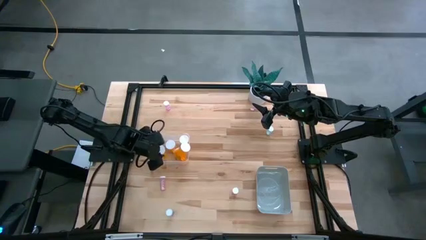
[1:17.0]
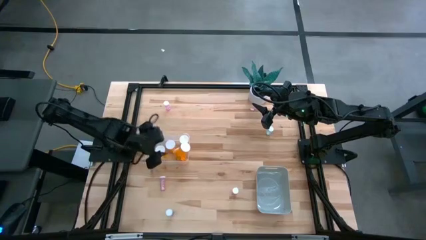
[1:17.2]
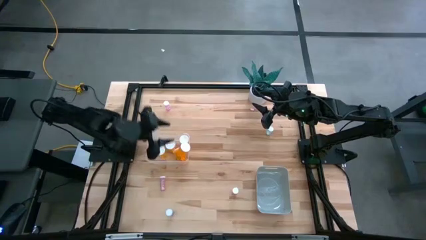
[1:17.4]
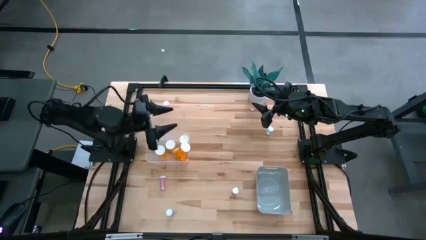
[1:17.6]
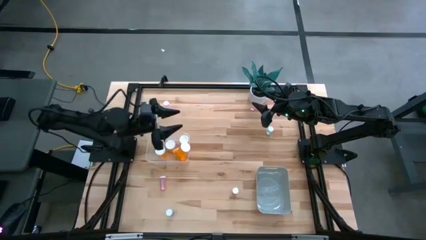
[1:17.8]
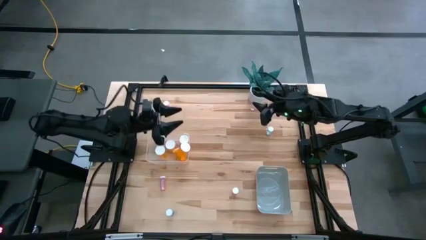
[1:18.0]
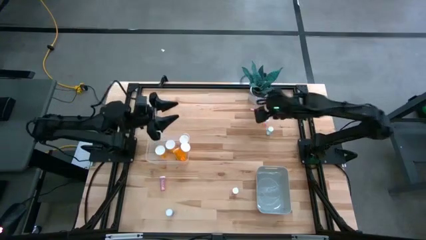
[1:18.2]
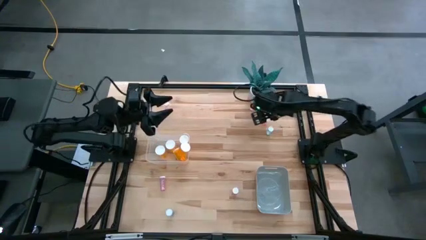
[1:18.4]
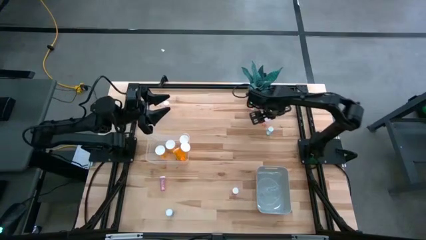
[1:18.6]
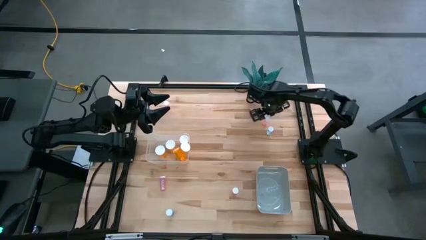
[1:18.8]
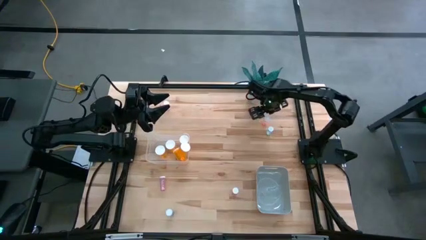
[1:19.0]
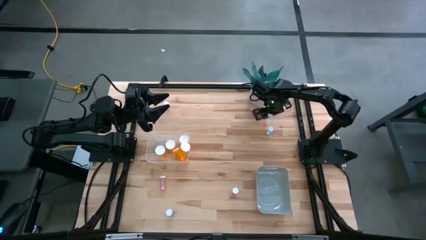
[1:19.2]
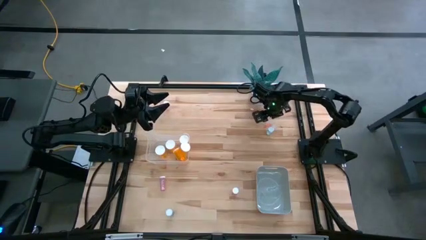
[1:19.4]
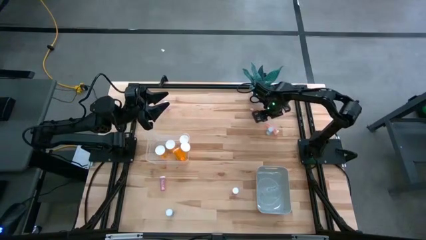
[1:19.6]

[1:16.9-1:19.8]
Task: Pick and place medicine bottles into bin by pill shape (circle, oval)
Put the small red pill bottle into the gray bin

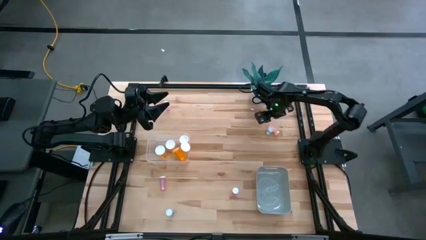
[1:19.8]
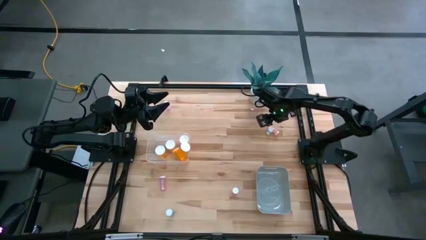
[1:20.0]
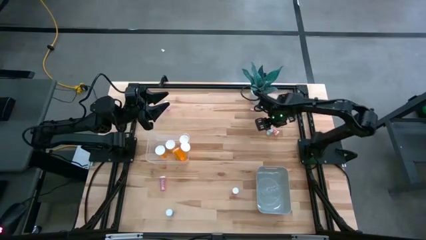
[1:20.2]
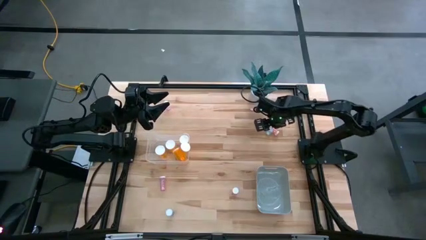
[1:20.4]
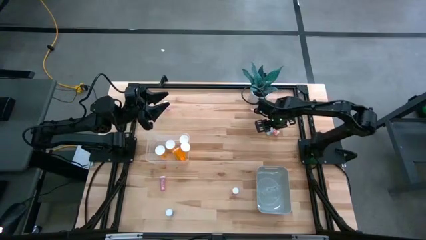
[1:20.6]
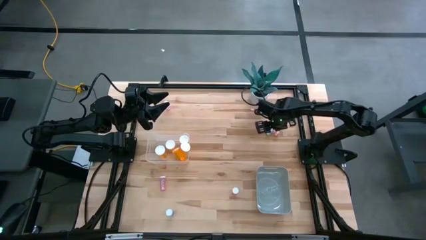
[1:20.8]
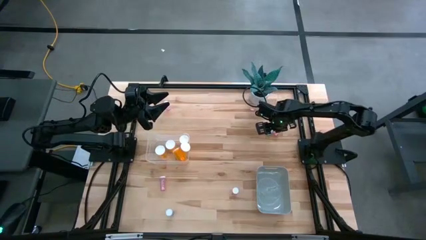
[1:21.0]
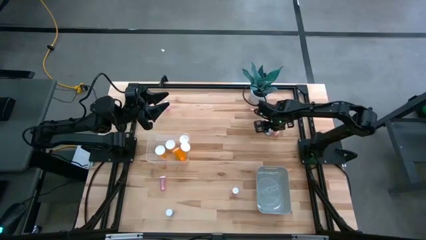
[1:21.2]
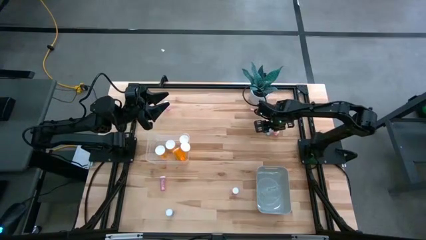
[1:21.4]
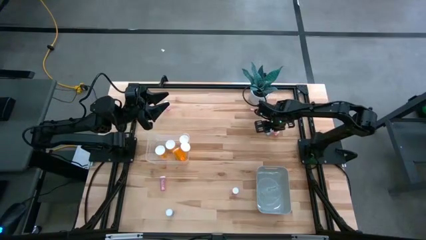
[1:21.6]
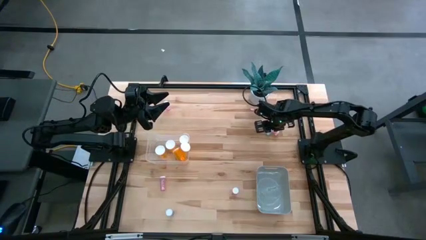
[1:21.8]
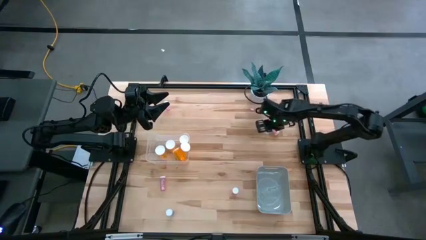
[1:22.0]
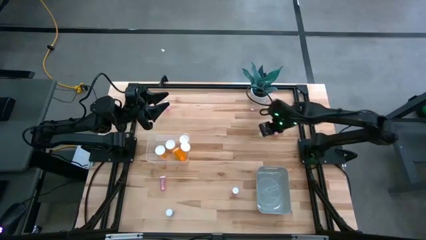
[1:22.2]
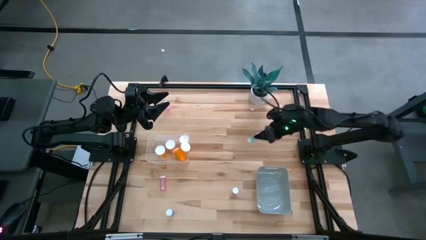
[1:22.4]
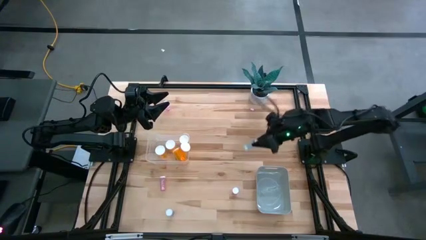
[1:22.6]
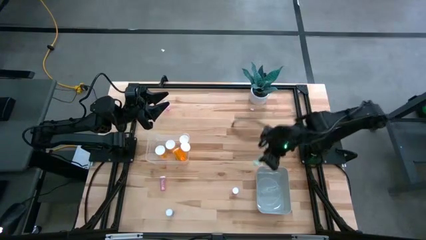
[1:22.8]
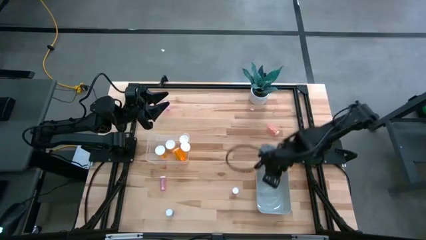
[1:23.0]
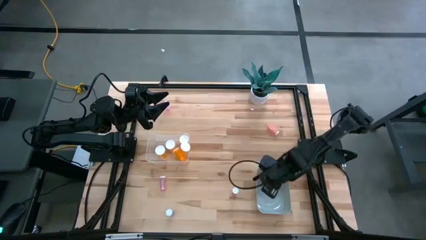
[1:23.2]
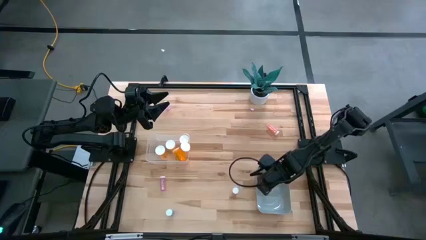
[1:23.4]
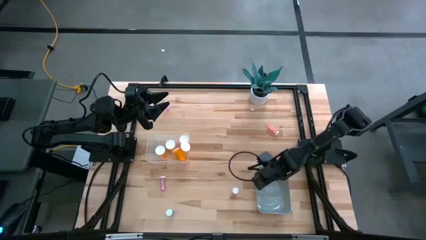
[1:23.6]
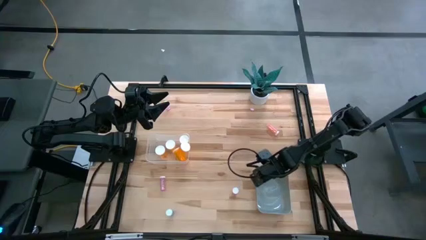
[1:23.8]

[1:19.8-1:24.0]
Put the small blue pill bottle into the gray bin

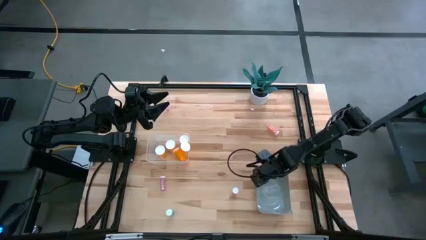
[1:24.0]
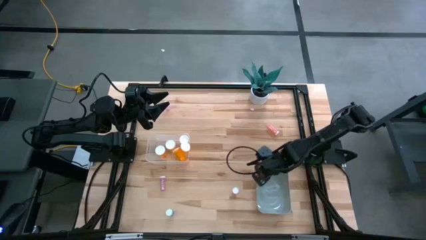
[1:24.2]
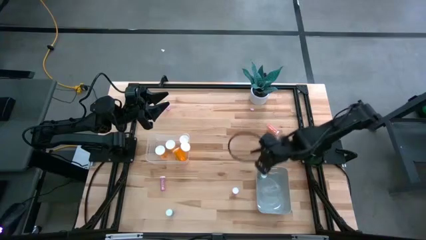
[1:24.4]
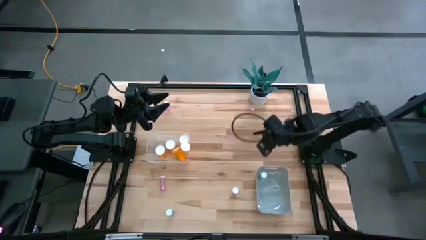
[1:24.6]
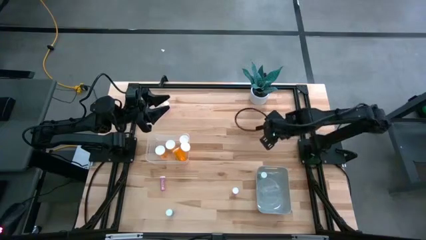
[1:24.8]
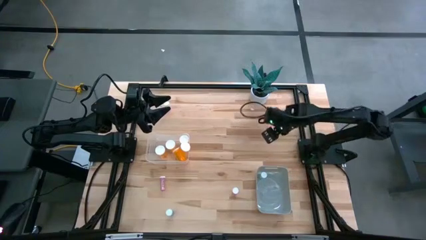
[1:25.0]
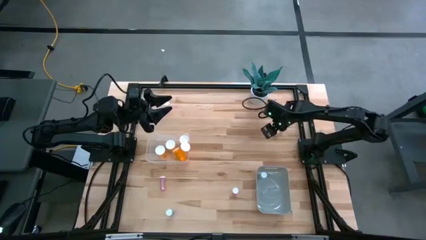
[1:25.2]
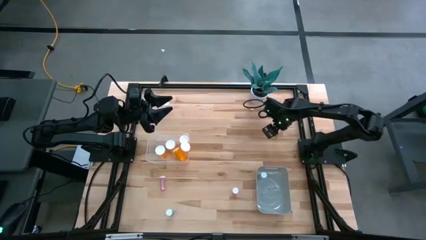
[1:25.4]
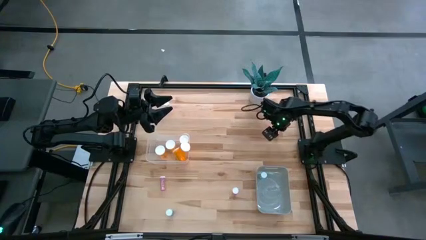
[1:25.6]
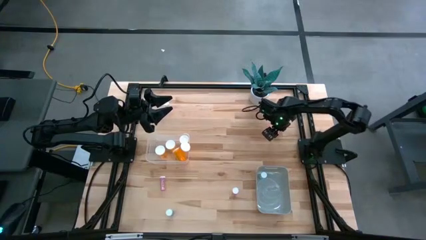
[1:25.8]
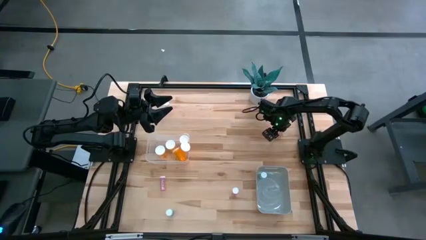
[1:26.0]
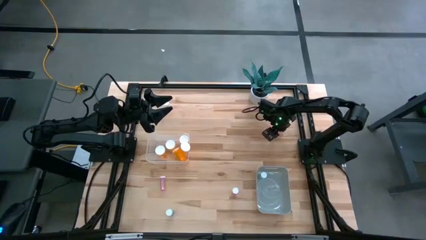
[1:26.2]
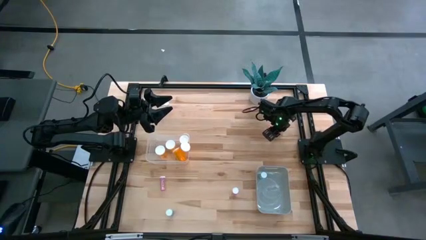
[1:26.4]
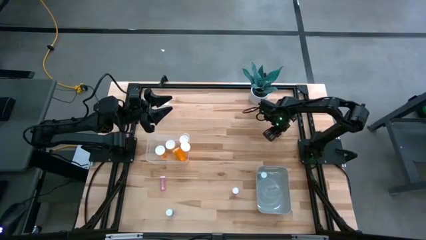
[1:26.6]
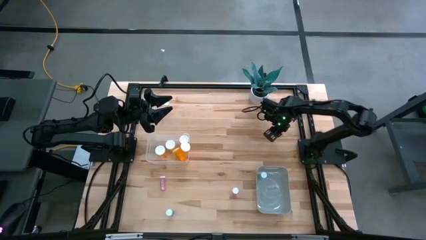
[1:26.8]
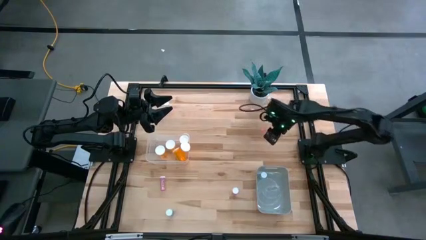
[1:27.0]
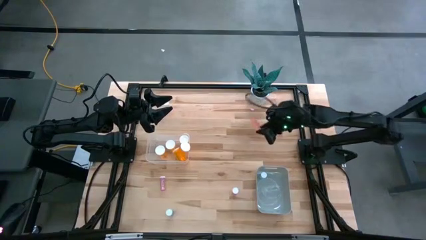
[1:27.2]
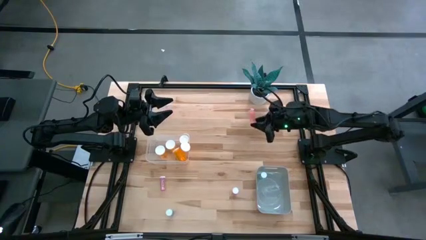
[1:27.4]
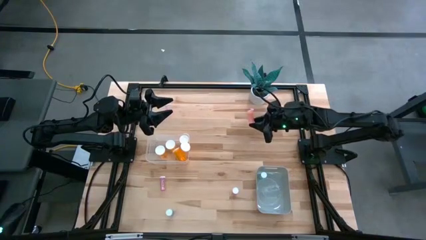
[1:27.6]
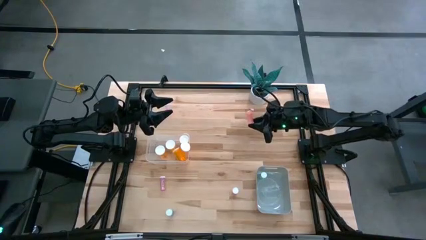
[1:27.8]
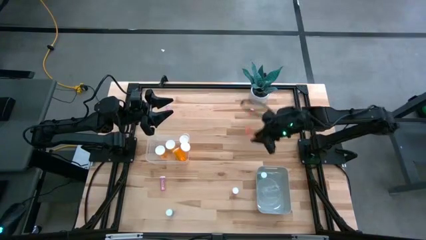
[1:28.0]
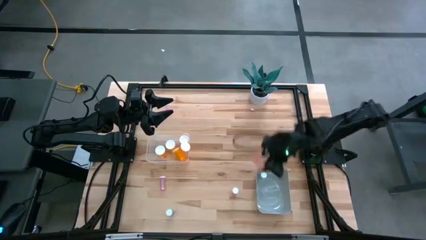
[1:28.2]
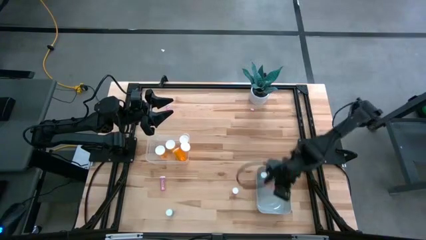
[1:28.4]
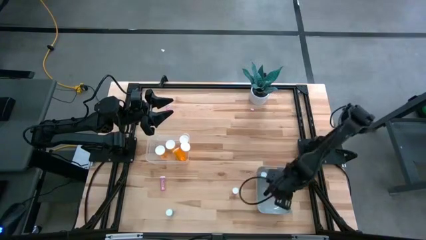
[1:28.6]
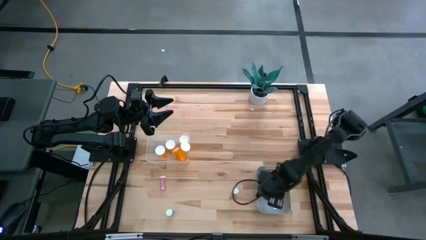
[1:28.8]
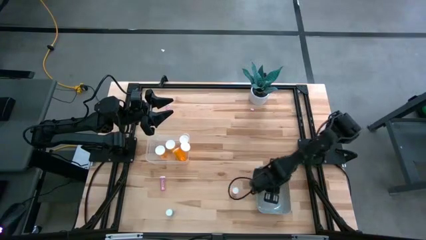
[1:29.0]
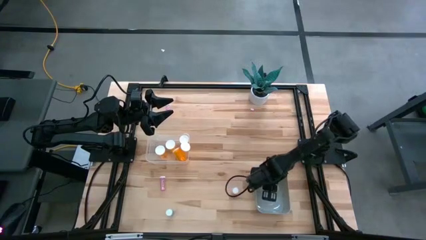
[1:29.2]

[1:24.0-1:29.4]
Put the small red pill bottle into the gray bin
